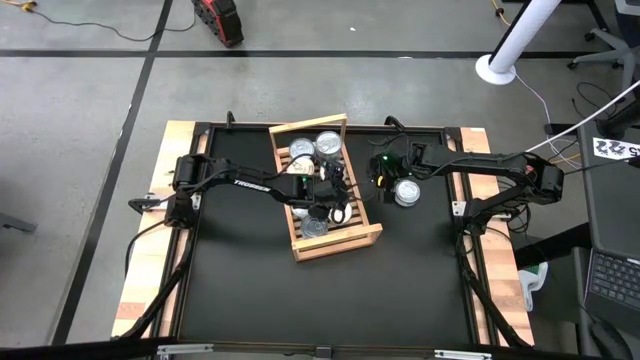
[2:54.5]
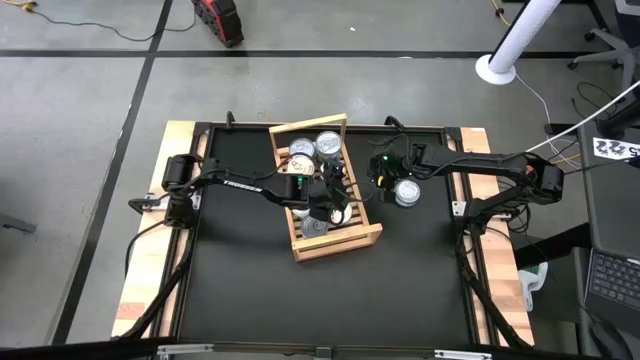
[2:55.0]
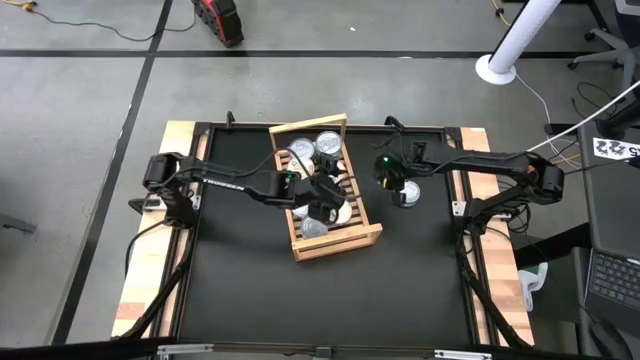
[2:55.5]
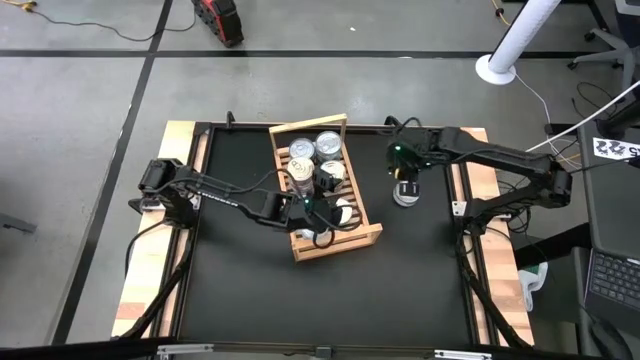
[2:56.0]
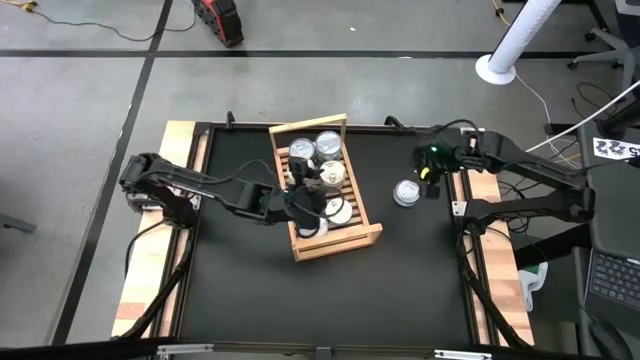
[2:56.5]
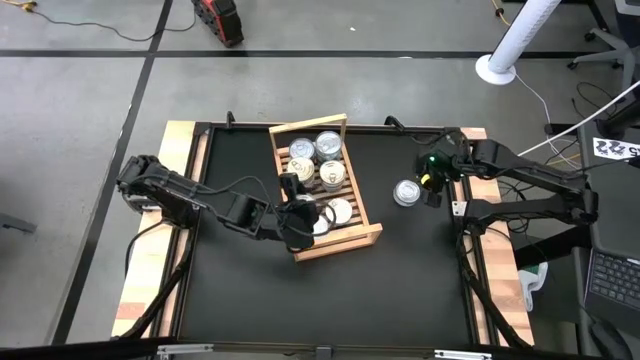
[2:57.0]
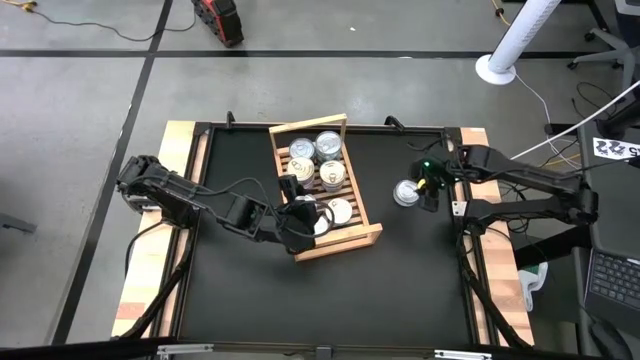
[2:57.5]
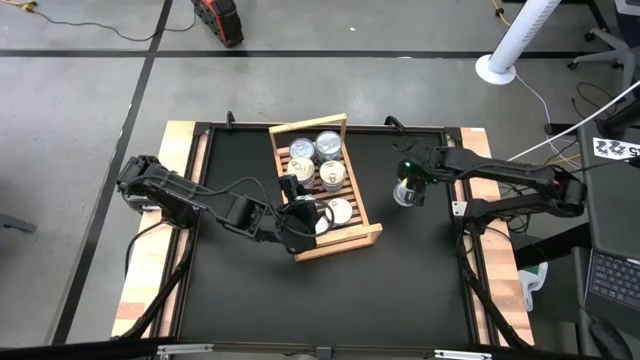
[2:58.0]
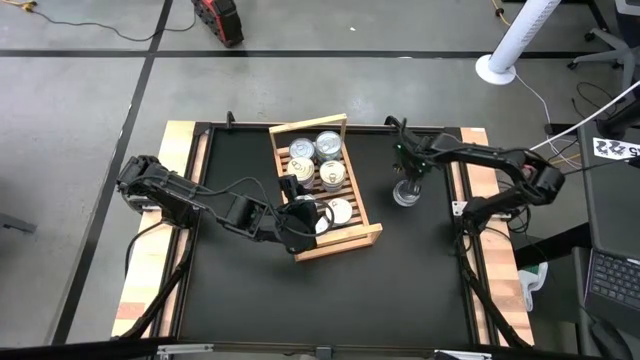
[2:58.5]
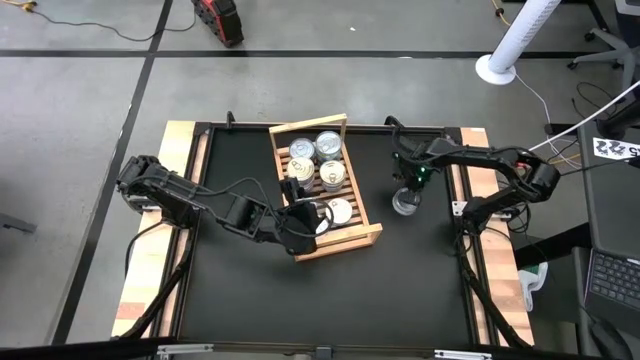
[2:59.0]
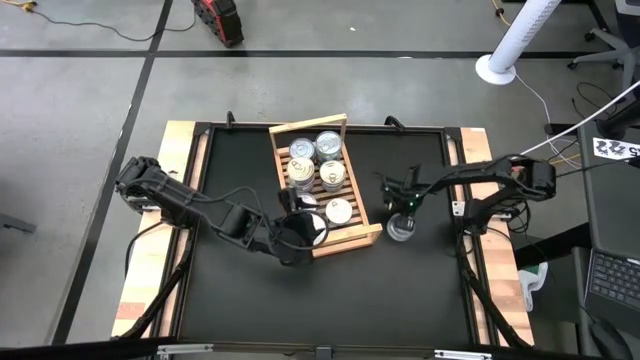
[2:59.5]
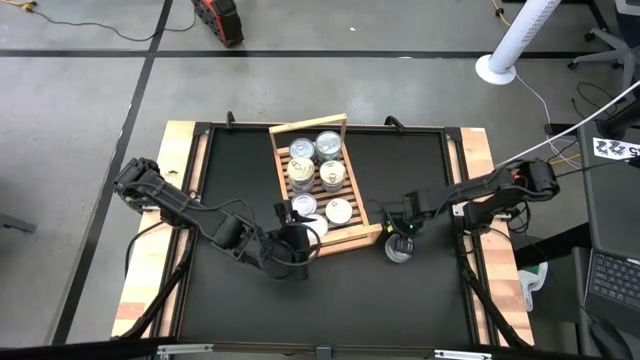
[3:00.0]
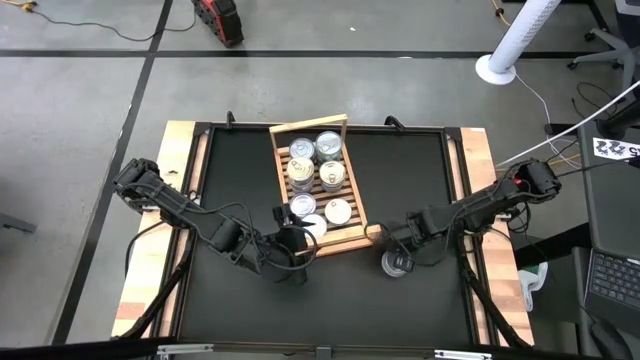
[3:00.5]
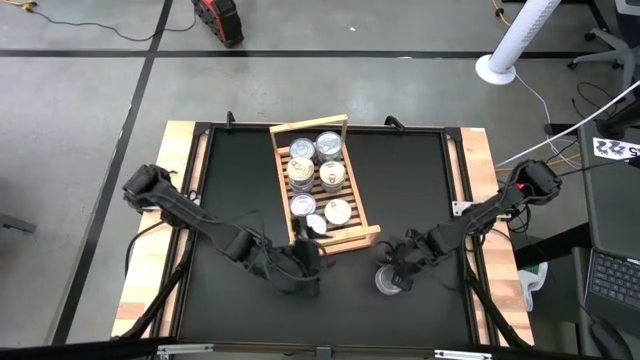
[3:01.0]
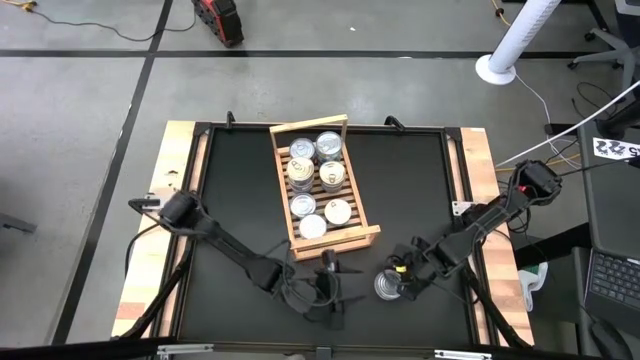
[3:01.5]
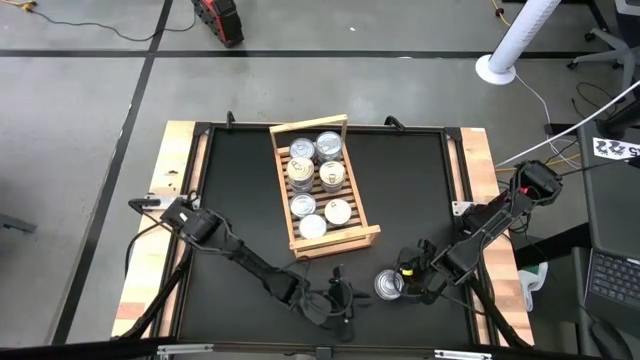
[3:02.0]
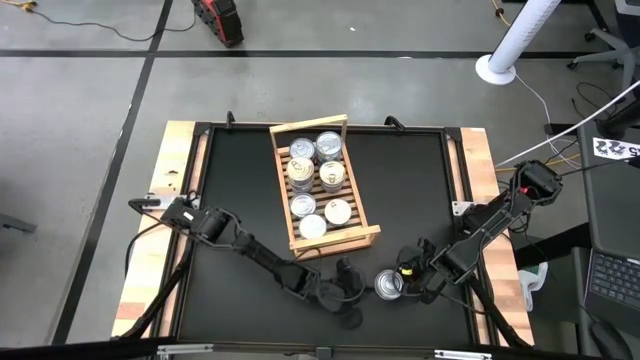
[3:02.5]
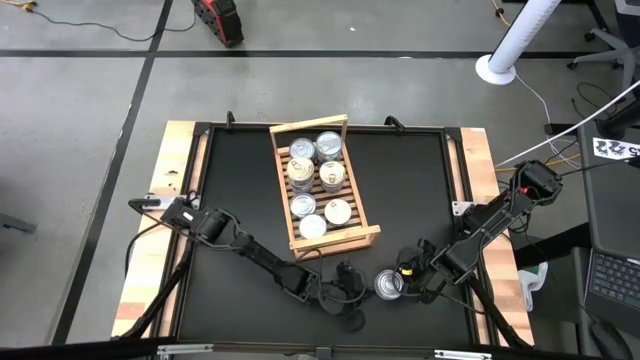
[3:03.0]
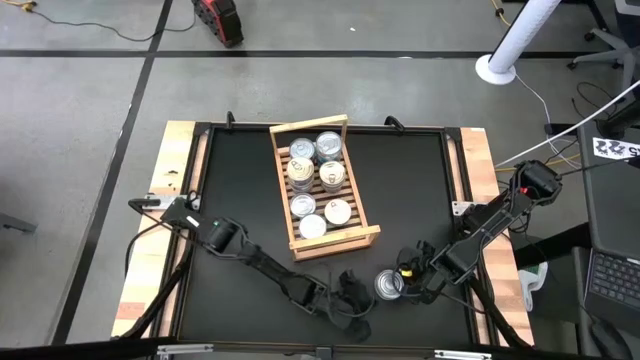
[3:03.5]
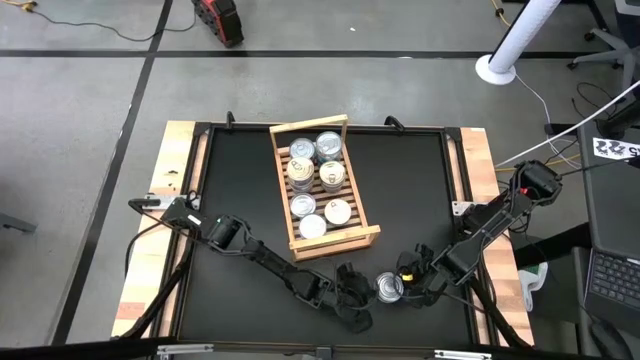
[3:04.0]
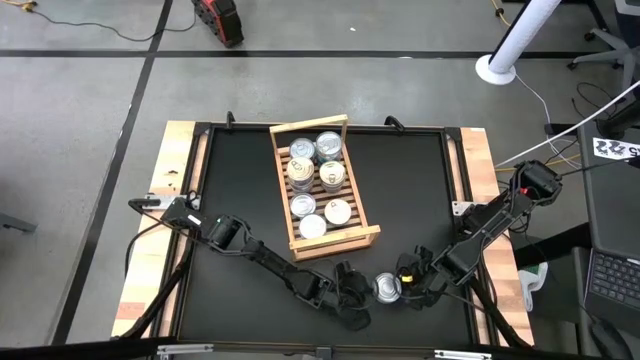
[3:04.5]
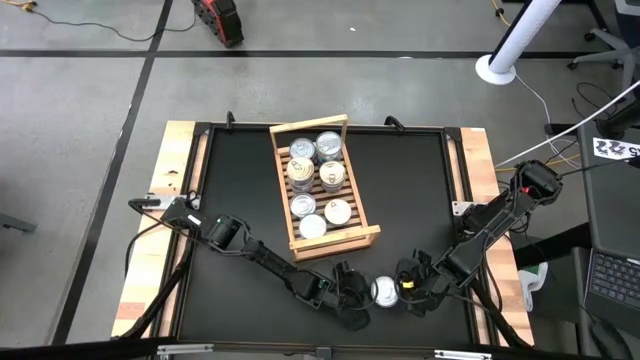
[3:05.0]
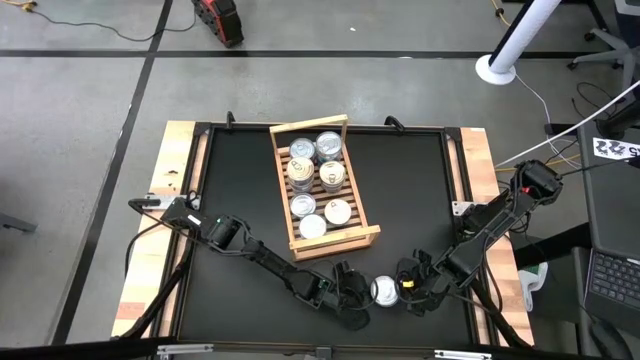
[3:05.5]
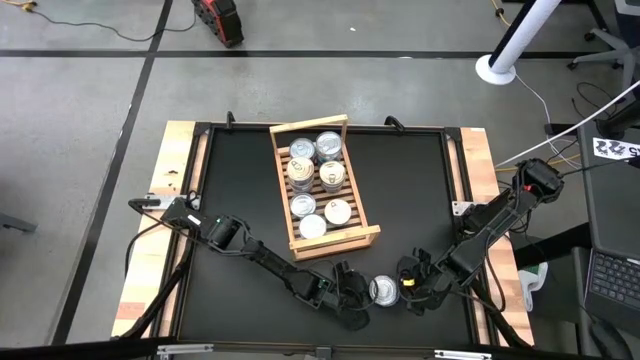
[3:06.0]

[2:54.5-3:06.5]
Task: Stack canned seafood by type on shelf
Stack the green tuna can on top of the other green tuna can on the shelf

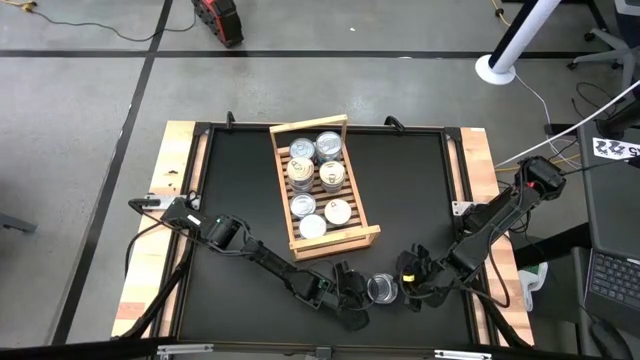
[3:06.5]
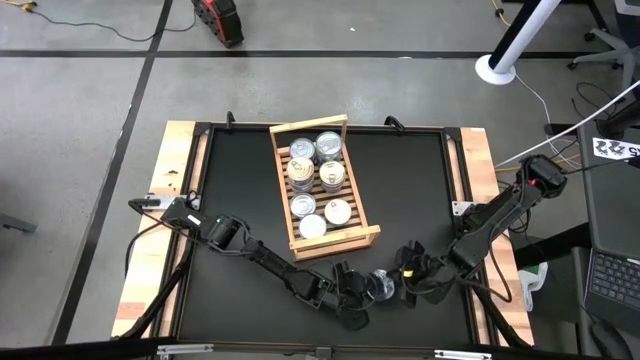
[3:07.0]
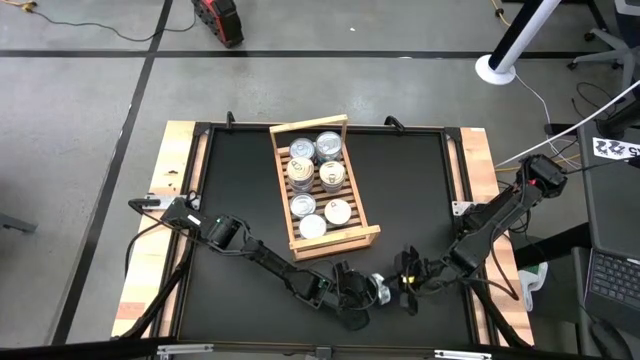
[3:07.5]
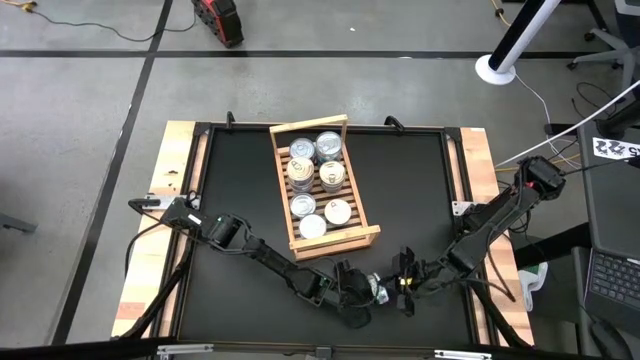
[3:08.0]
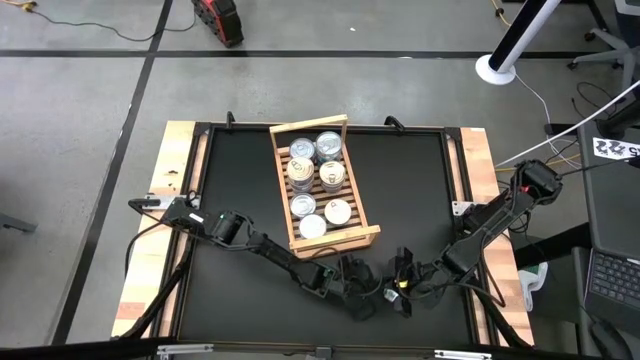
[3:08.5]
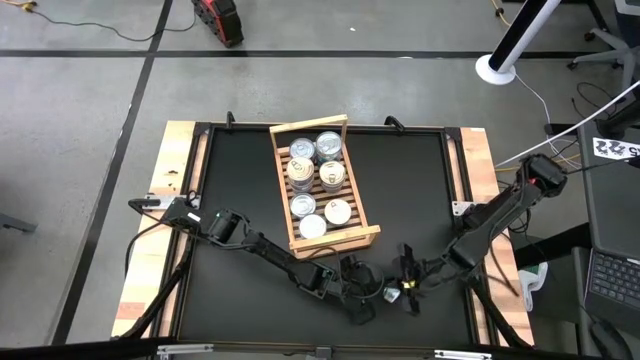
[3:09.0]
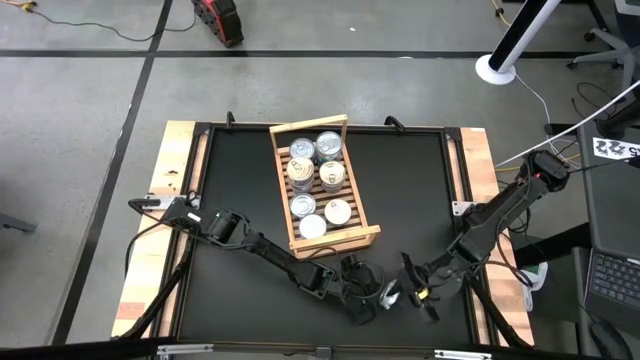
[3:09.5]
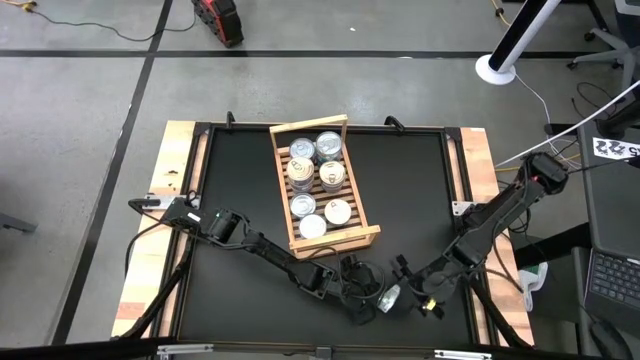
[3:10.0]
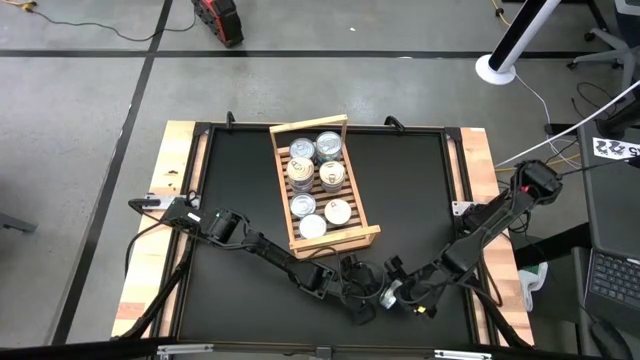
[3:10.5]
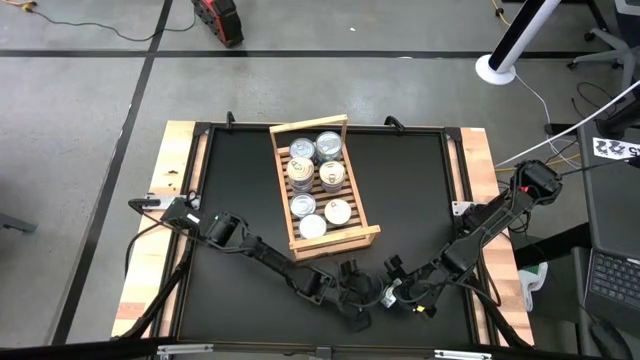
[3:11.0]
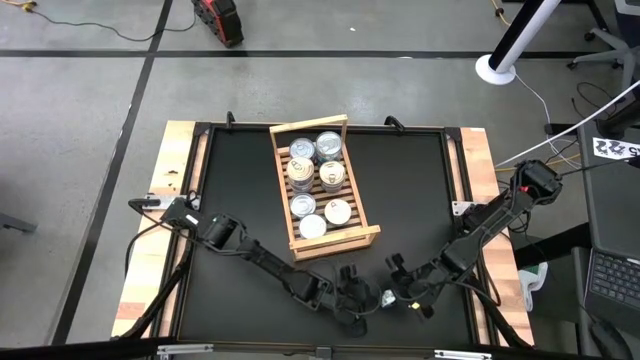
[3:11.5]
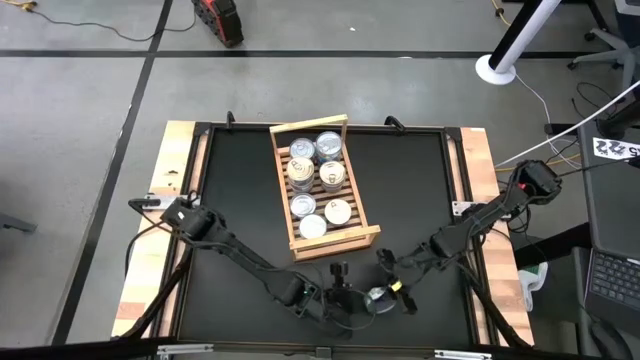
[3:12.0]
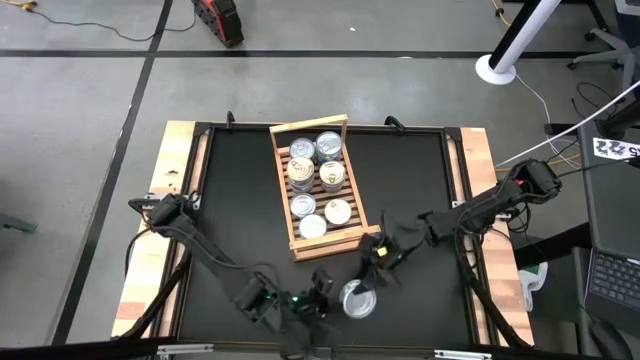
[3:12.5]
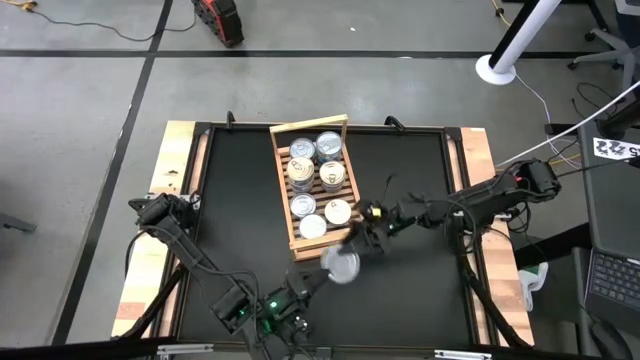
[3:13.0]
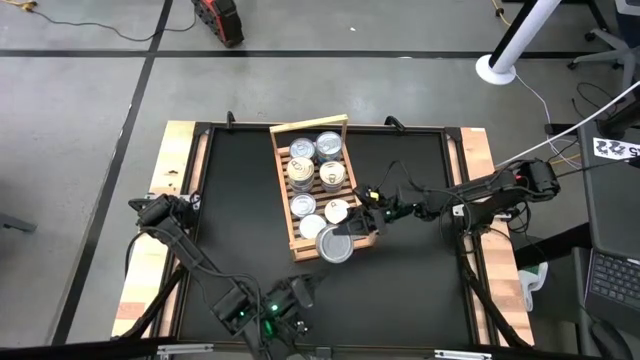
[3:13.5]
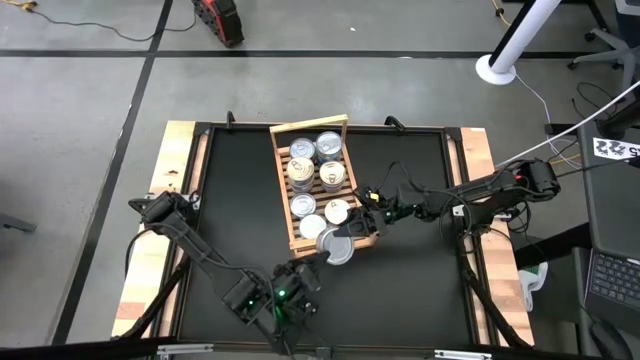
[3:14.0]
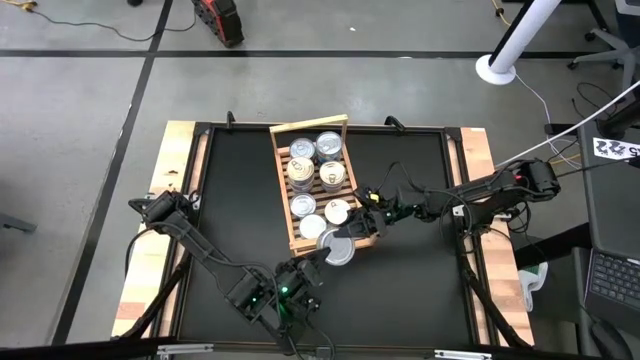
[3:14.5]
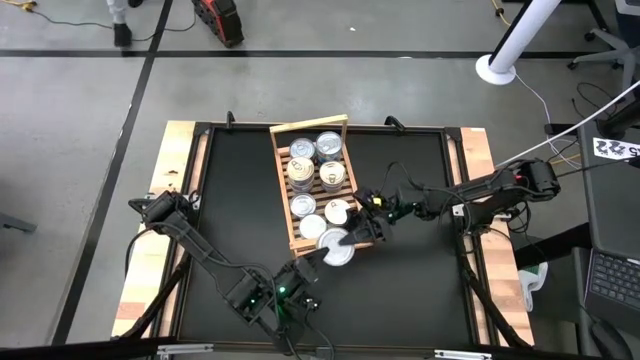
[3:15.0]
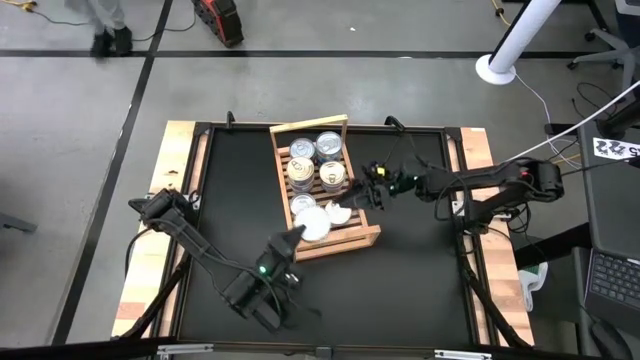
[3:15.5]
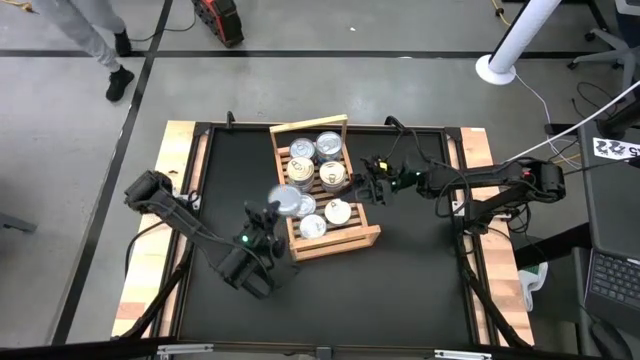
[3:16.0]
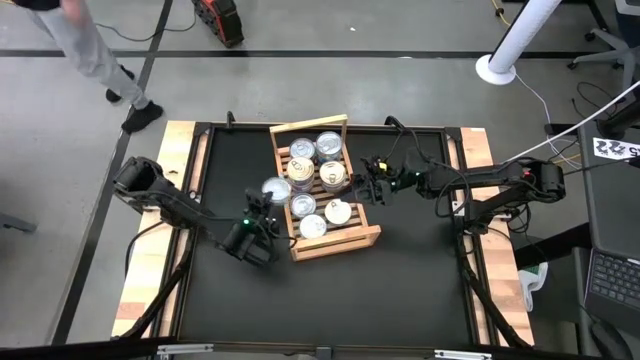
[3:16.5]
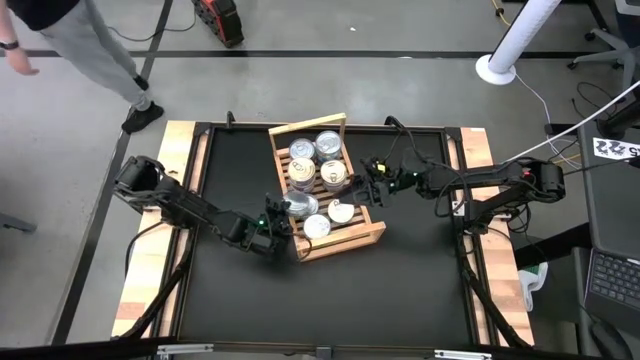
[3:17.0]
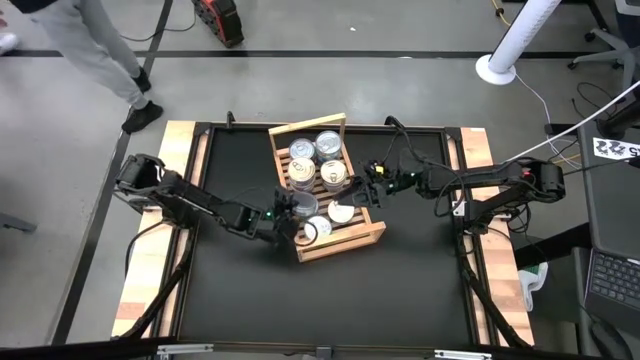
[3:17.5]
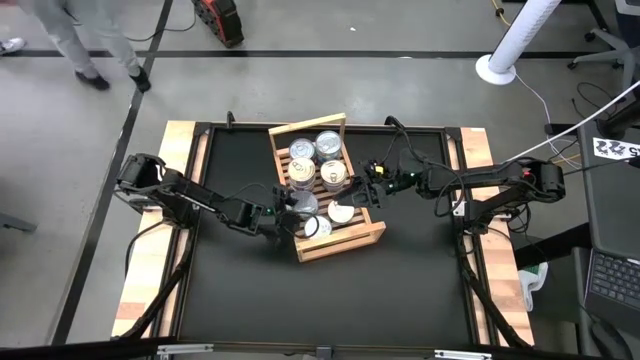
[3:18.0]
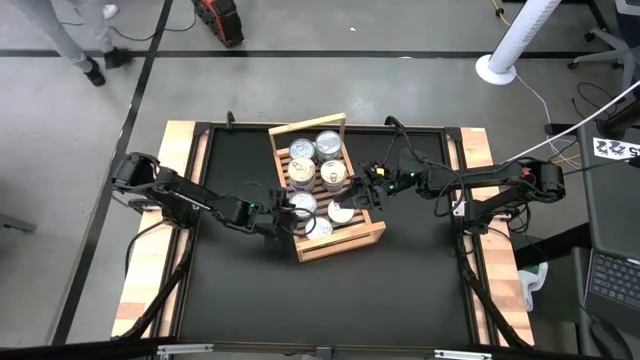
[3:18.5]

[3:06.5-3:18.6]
Stack the green tuna can on top of the other green tuna can on the shelf
